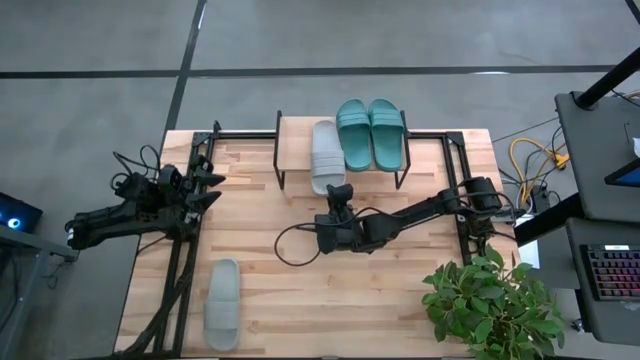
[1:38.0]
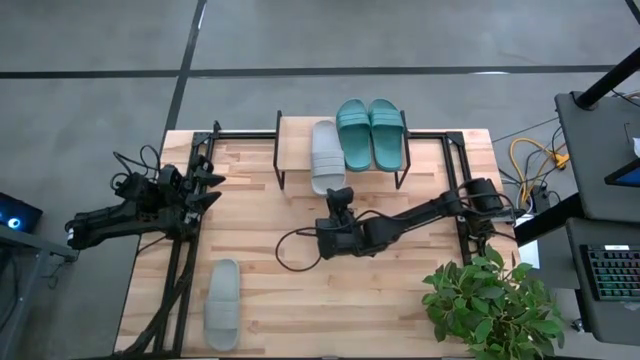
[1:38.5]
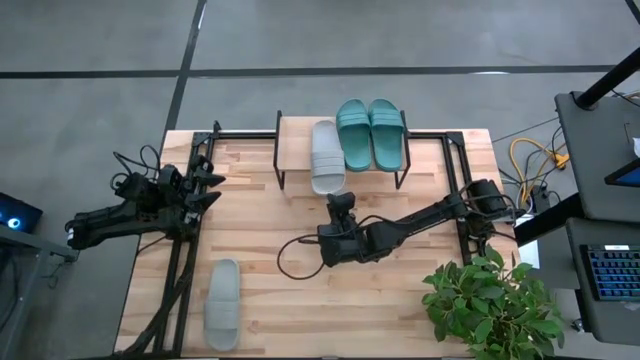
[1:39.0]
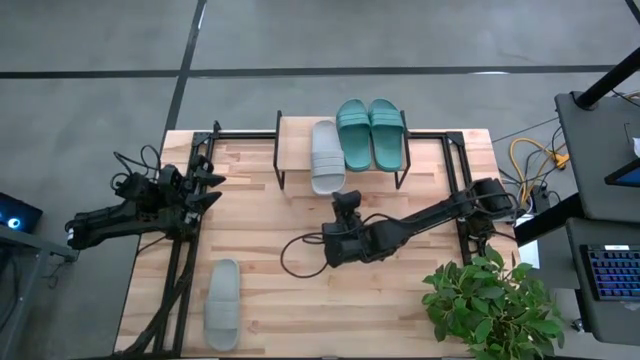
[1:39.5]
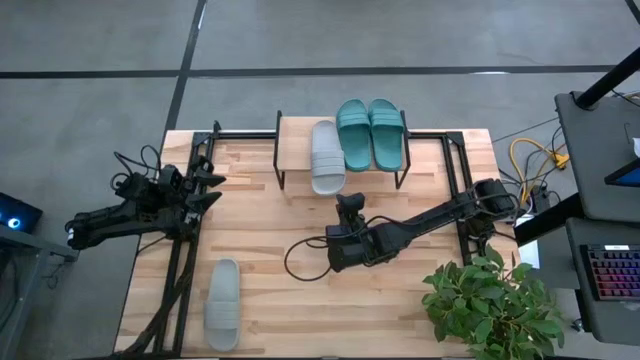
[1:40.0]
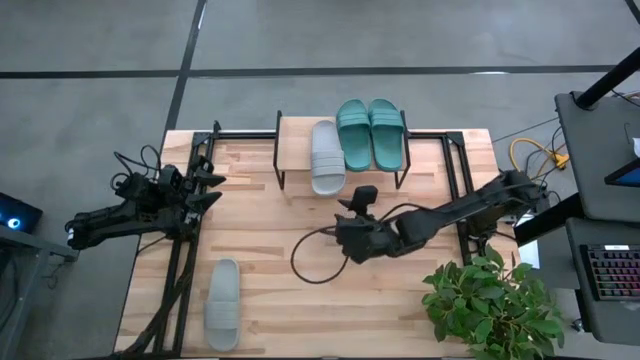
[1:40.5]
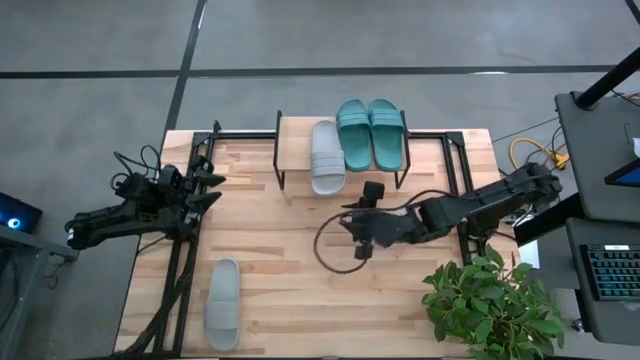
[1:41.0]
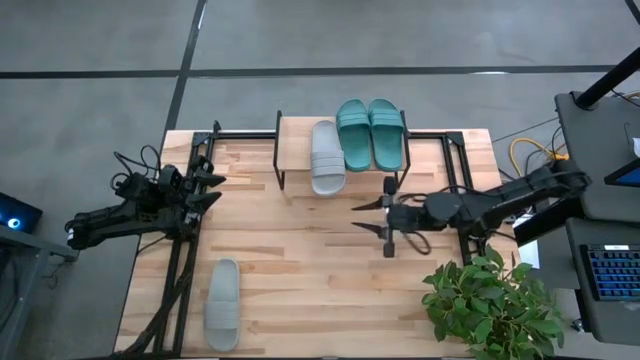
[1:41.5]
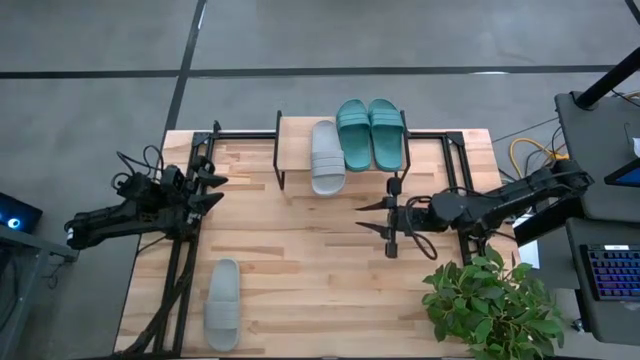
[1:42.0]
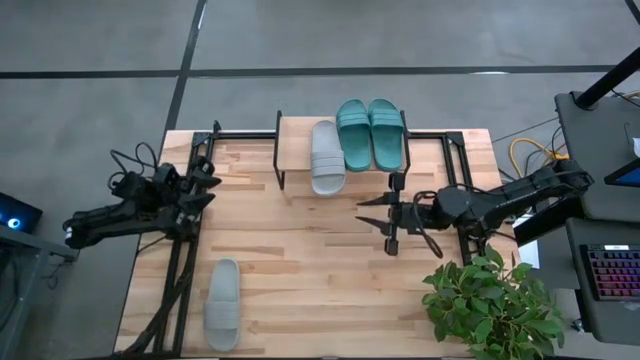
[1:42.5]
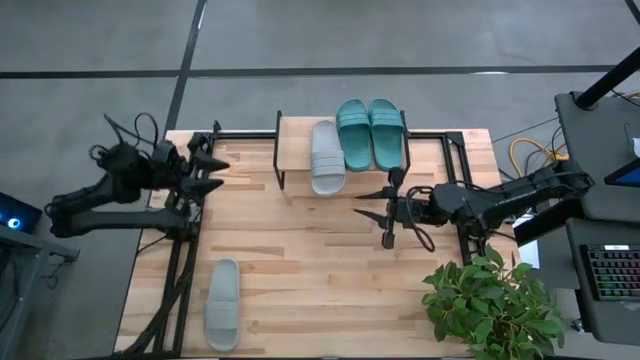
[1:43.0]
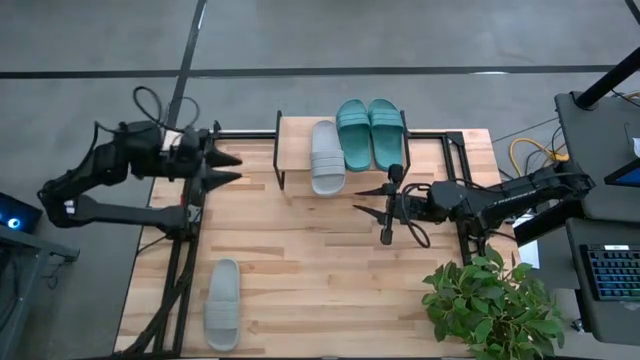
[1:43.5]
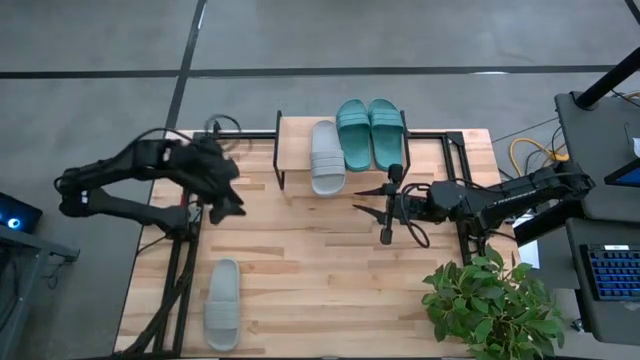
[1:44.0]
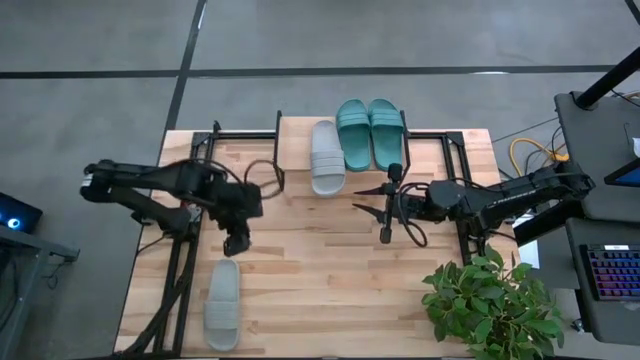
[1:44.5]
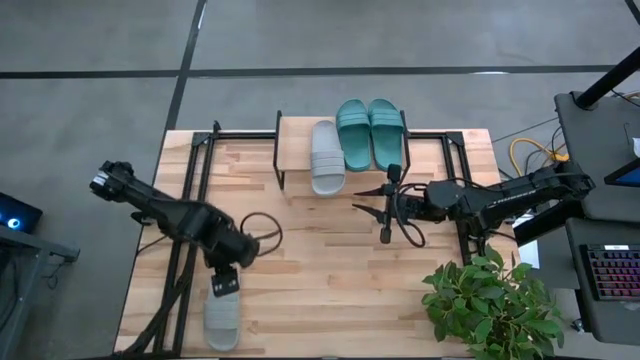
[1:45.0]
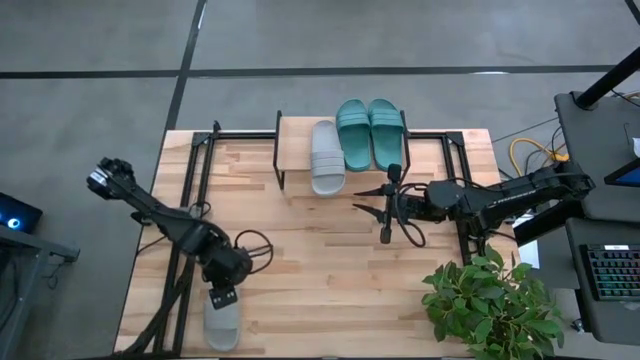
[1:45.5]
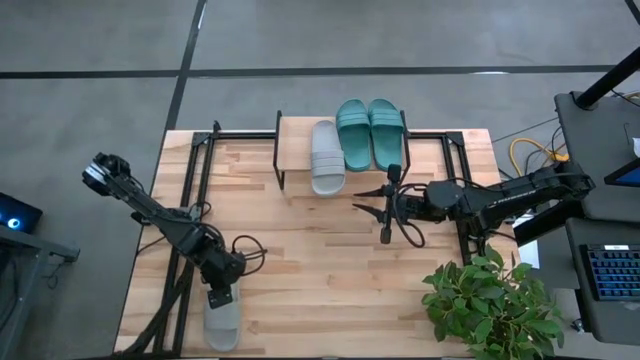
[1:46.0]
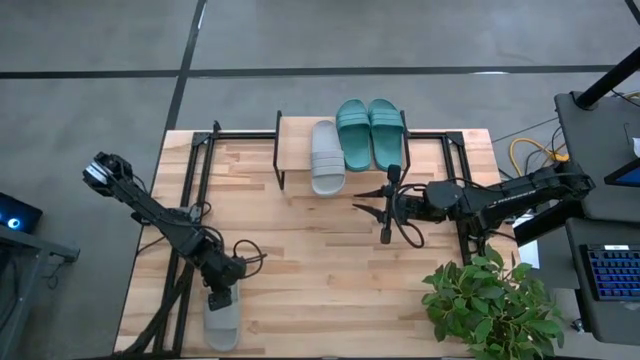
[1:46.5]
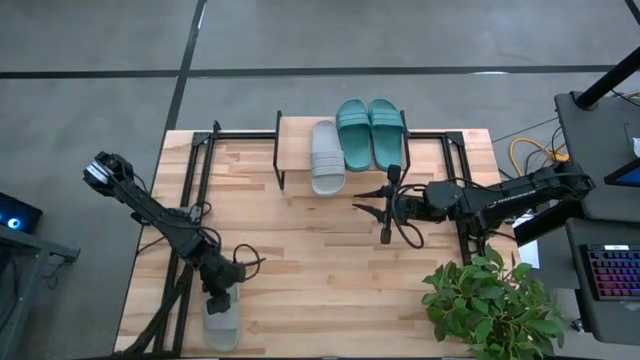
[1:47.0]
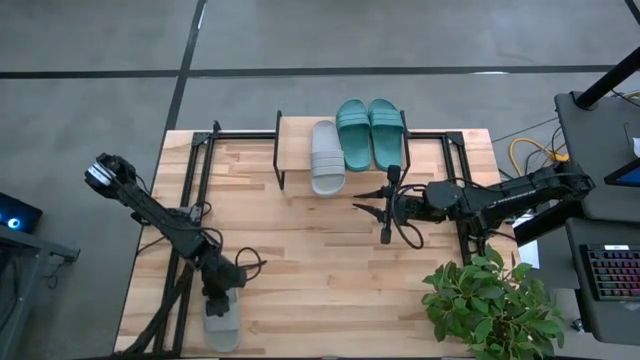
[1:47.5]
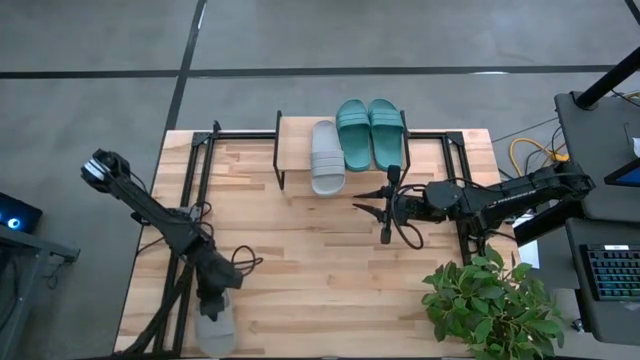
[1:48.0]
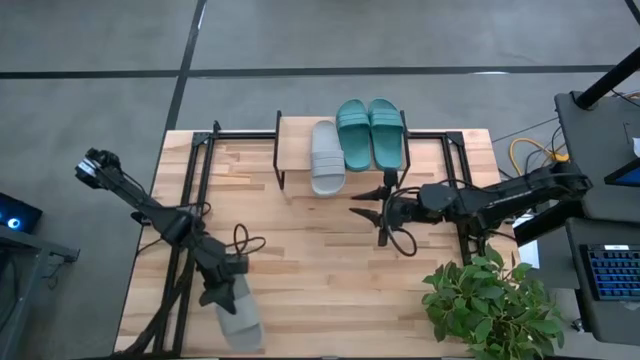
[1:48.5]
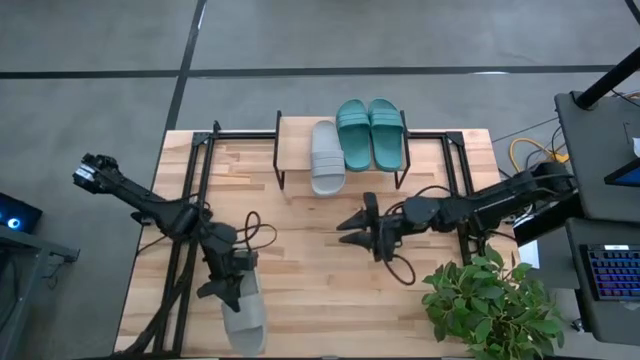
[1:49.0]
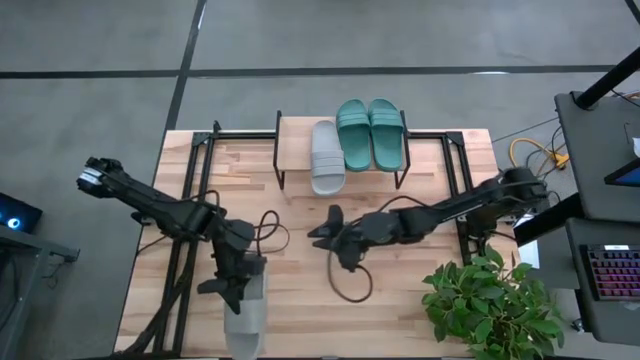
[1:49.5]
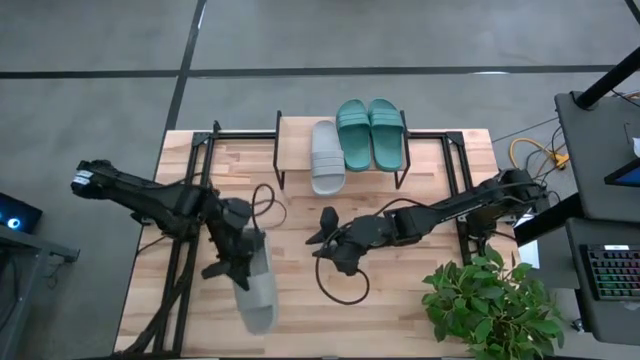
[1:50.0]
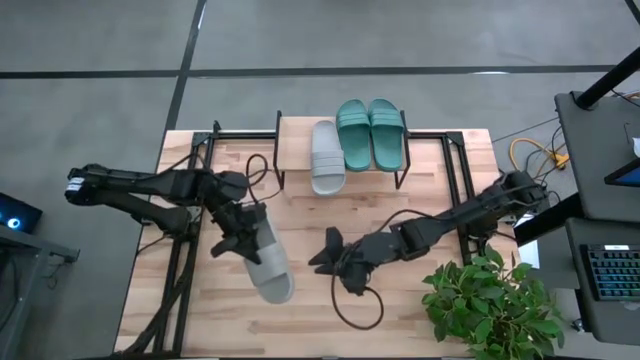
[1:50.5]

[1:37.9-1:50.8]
Task: Pick and place slides into the shelf
Put the gray slide on the shelf

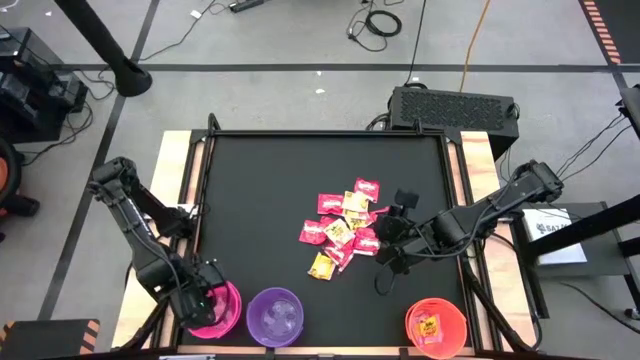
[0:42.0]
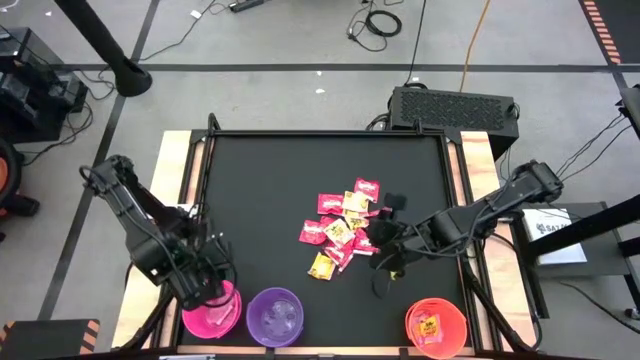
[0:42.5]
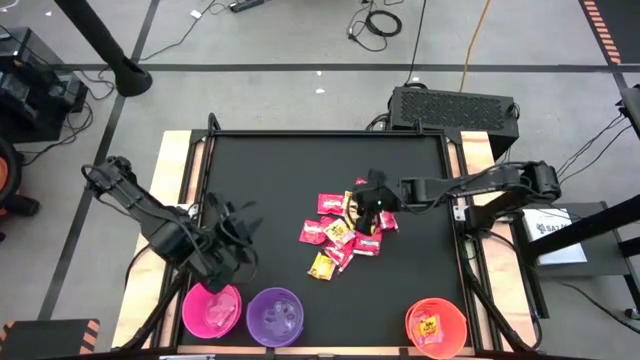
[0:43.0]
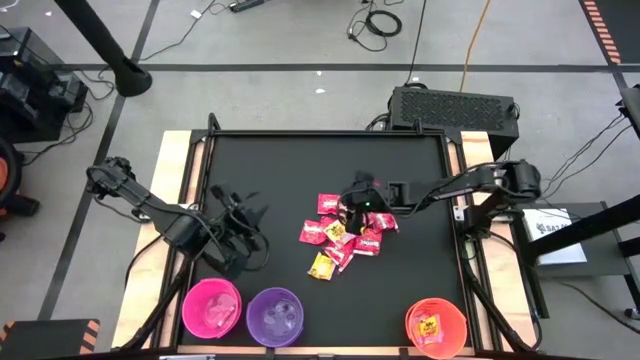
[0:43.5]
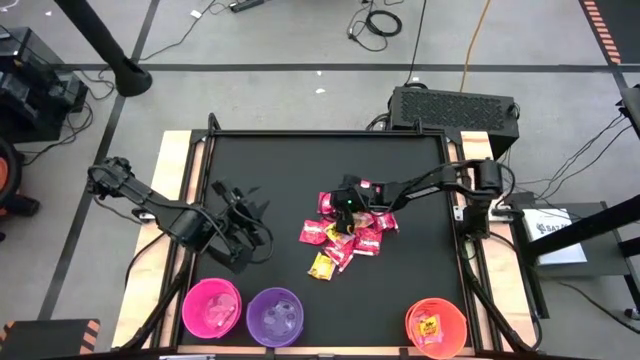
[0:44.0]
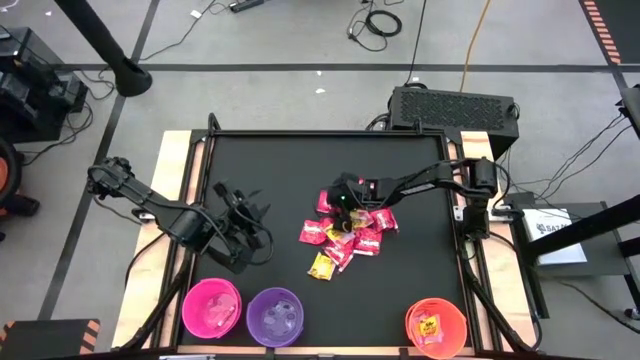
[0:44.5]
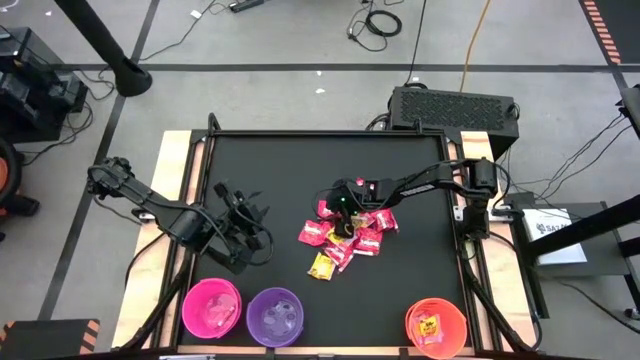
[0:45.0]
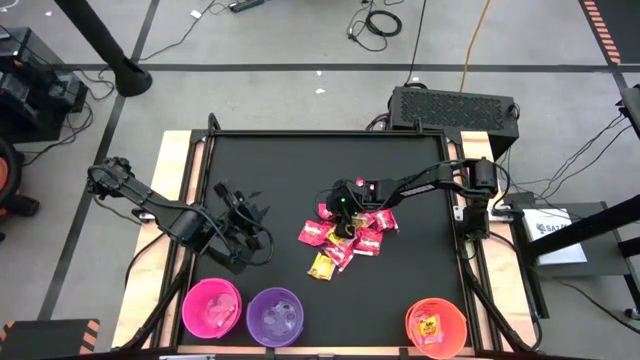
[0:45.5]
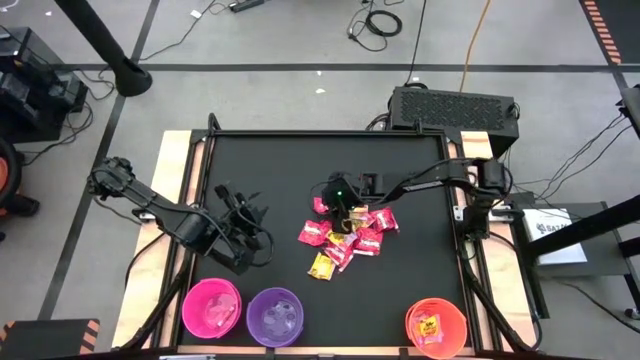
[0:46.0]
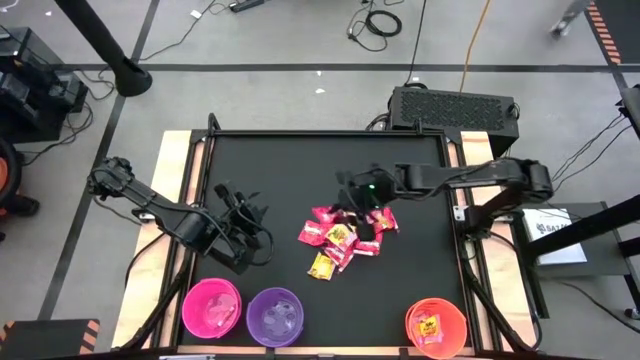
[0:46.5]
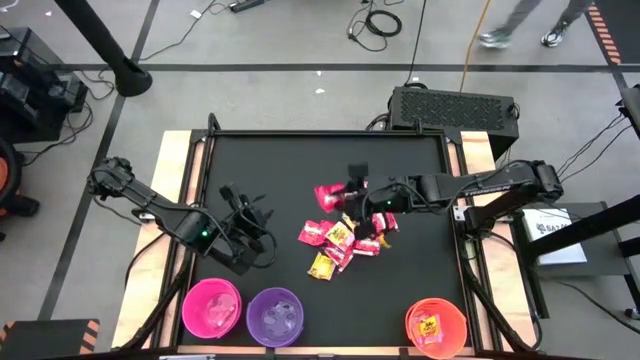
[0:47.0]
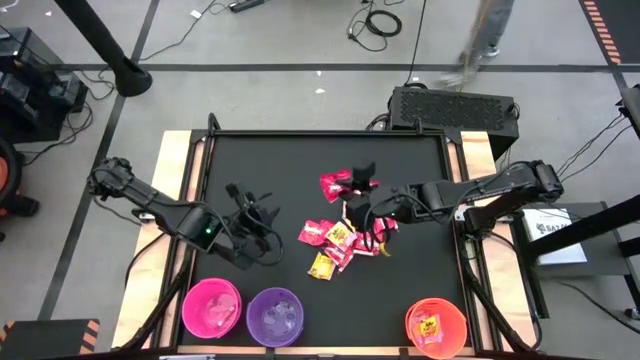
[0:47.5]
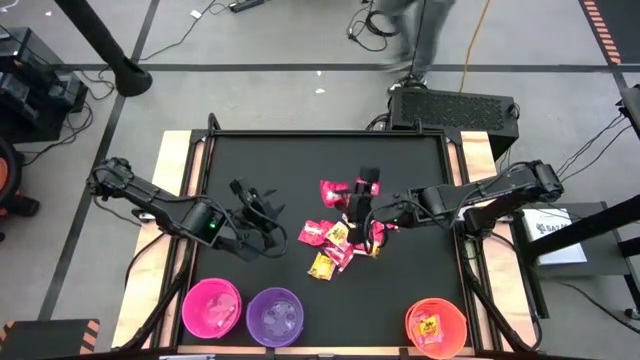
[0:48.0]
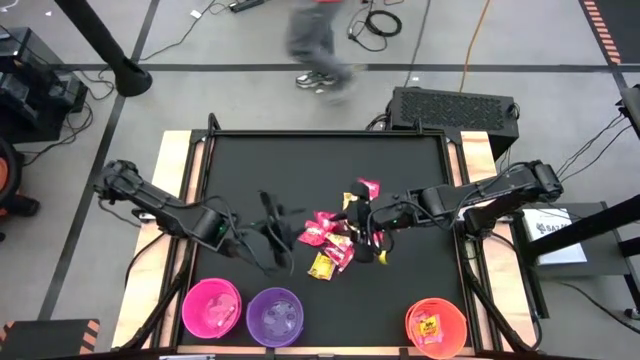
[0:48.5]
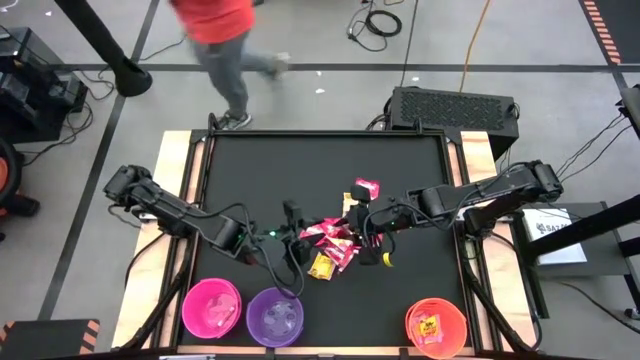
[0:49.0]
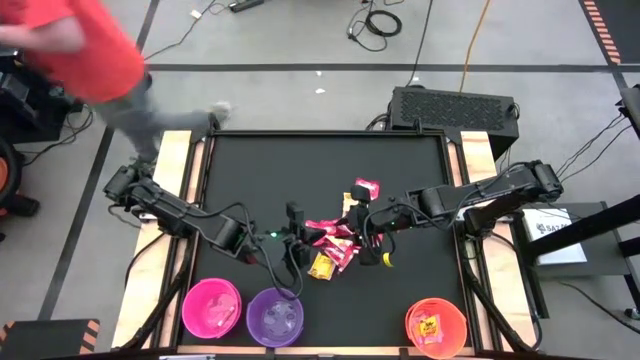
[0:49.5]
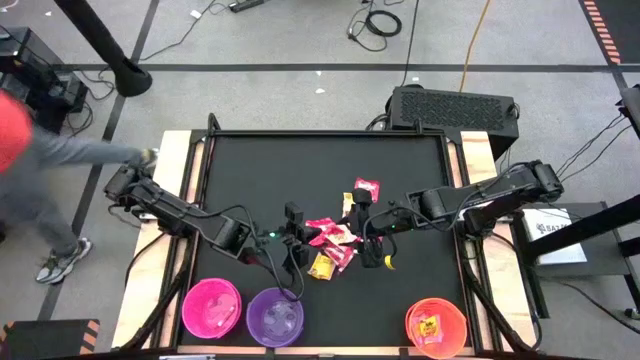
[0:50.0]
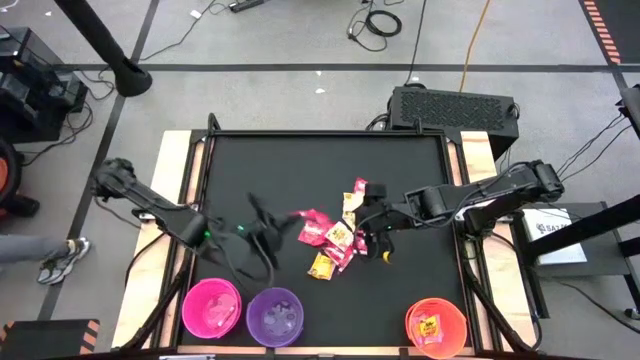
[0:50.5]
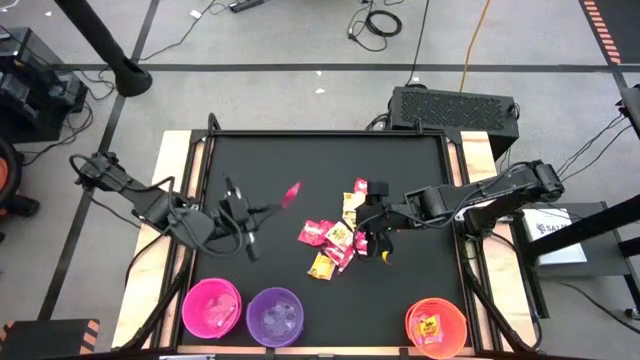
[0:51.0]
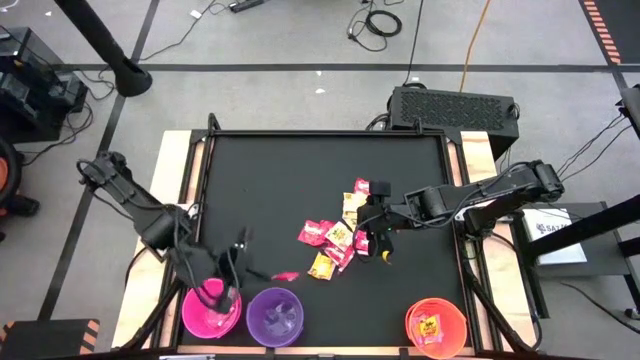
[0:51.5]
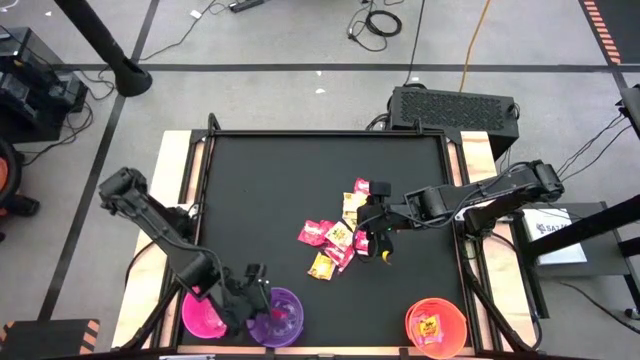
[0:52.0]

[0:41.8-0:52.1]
Task: Sort candy by brand, put in halloween buckets
Put the red candy into the violet bucket
